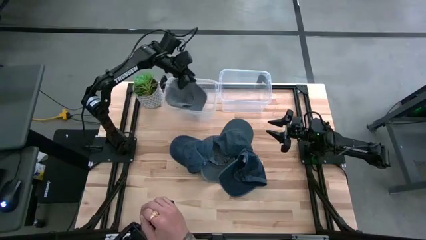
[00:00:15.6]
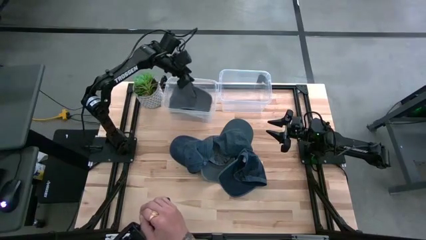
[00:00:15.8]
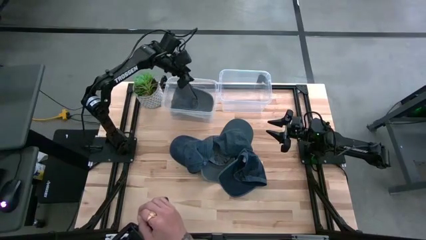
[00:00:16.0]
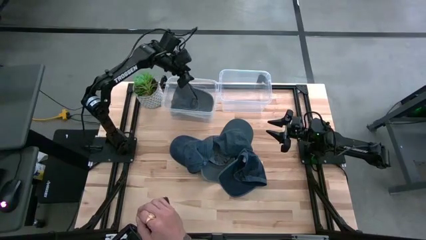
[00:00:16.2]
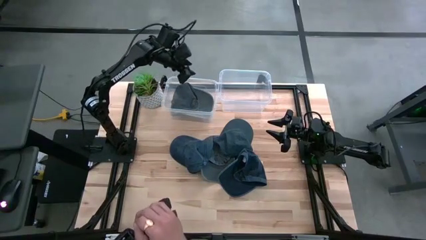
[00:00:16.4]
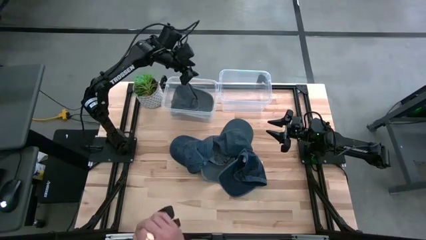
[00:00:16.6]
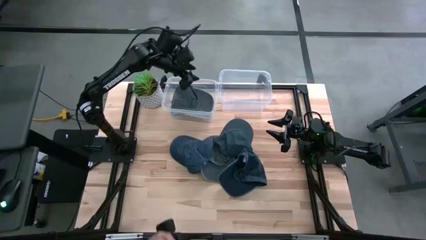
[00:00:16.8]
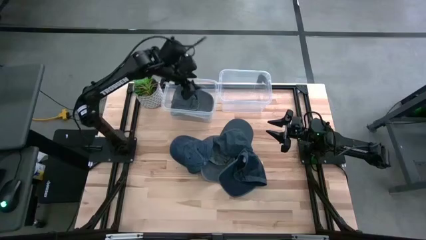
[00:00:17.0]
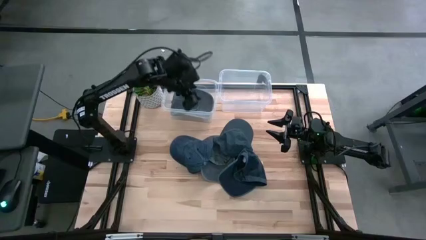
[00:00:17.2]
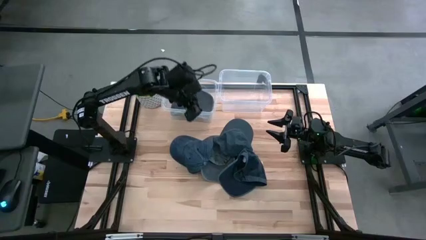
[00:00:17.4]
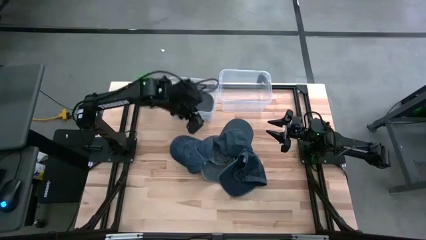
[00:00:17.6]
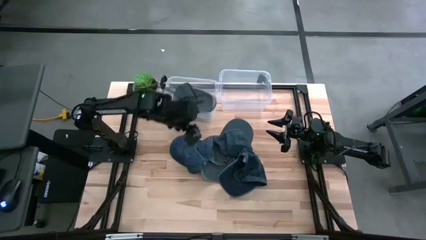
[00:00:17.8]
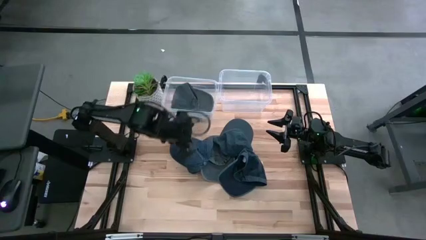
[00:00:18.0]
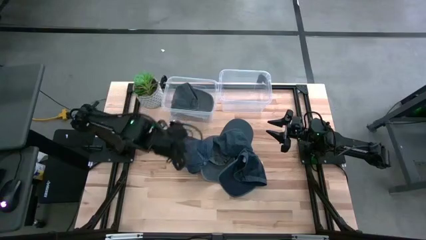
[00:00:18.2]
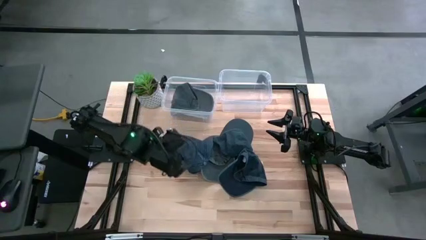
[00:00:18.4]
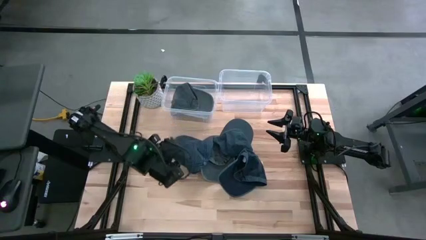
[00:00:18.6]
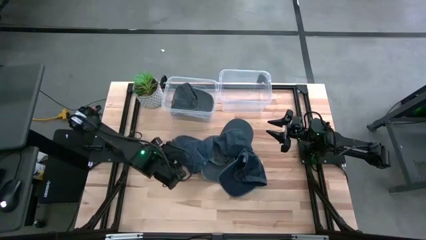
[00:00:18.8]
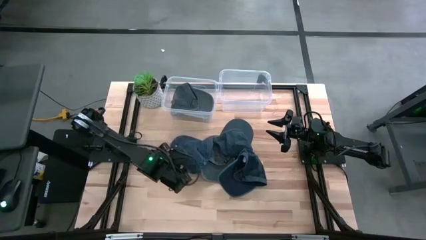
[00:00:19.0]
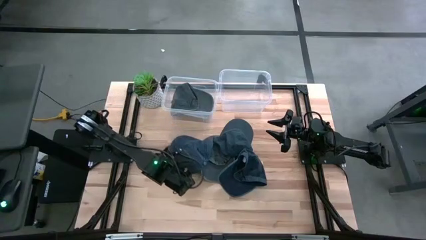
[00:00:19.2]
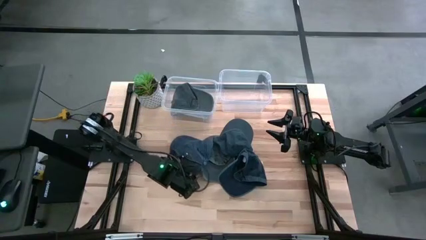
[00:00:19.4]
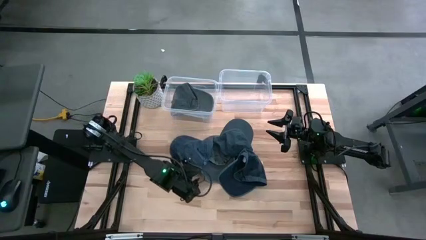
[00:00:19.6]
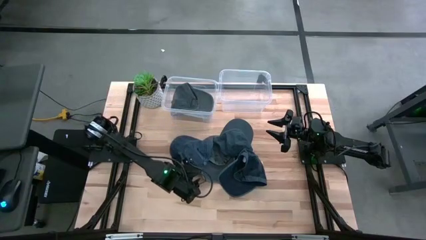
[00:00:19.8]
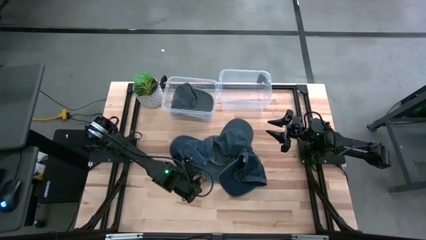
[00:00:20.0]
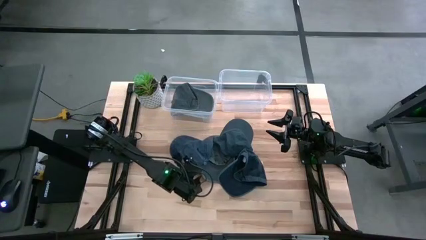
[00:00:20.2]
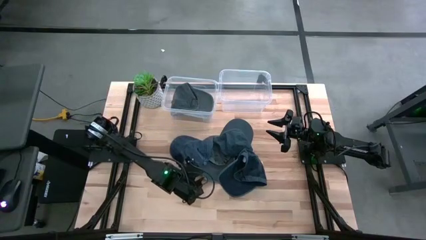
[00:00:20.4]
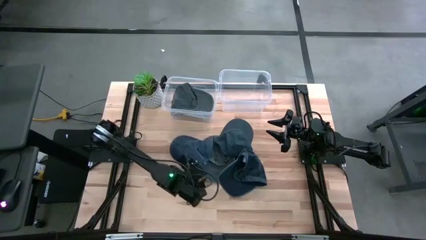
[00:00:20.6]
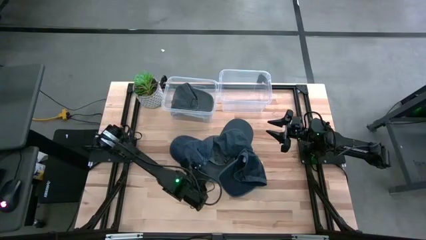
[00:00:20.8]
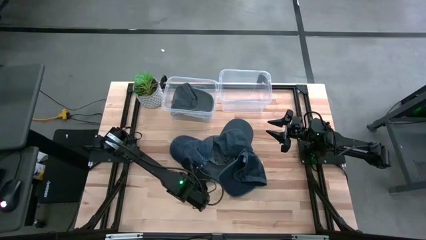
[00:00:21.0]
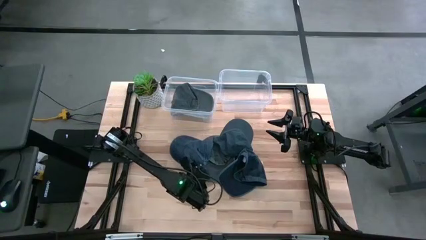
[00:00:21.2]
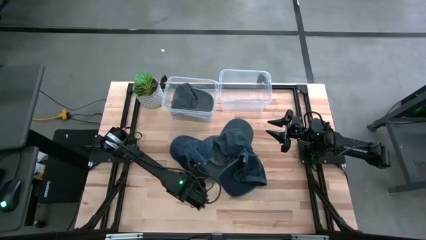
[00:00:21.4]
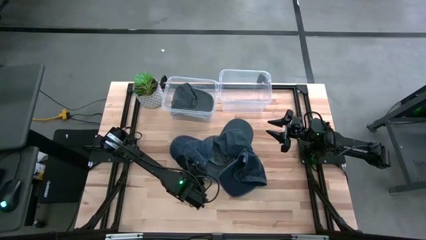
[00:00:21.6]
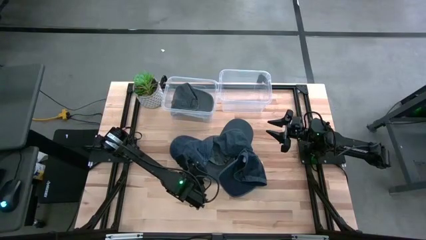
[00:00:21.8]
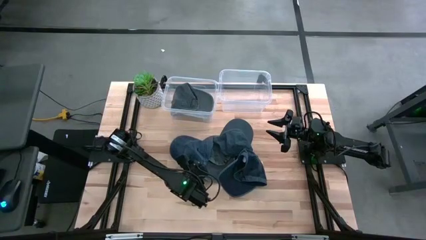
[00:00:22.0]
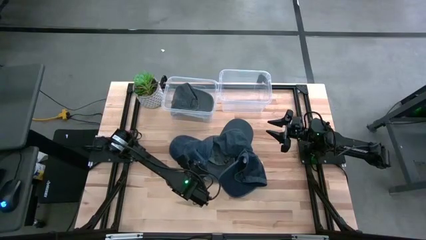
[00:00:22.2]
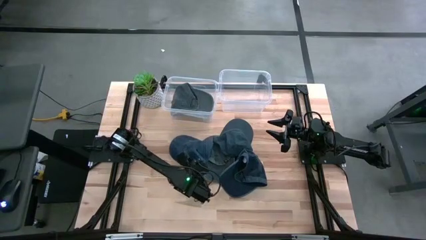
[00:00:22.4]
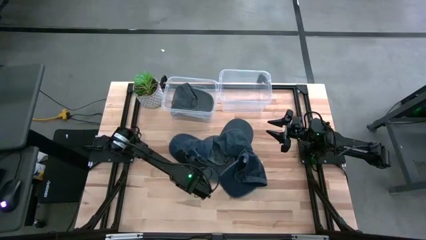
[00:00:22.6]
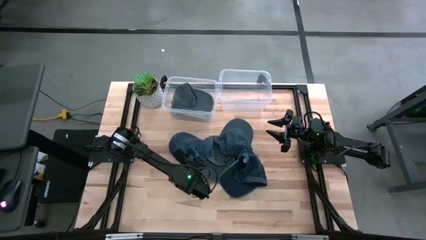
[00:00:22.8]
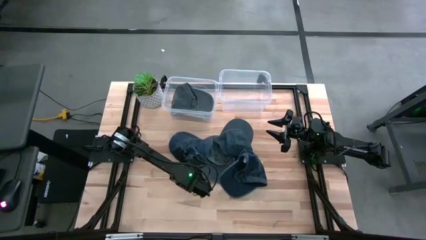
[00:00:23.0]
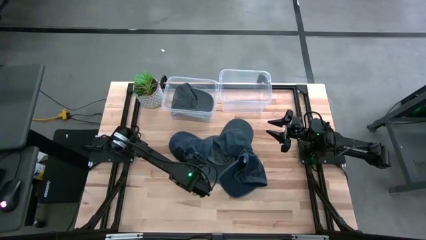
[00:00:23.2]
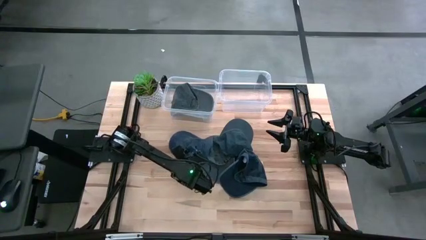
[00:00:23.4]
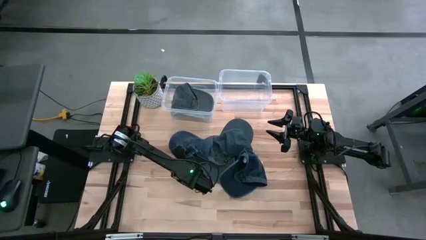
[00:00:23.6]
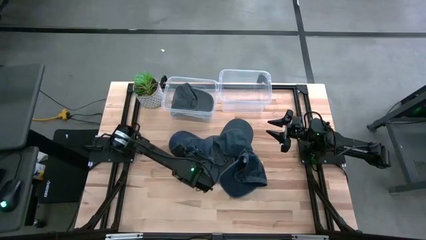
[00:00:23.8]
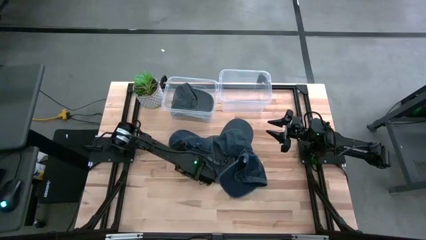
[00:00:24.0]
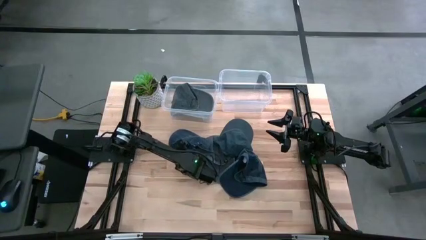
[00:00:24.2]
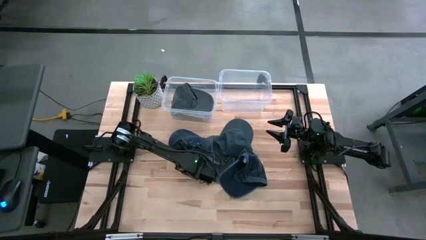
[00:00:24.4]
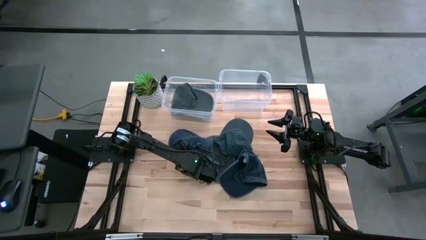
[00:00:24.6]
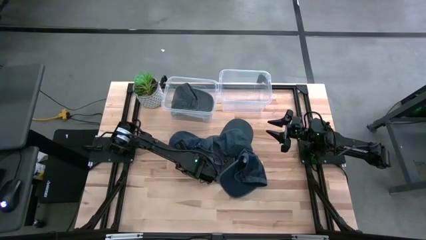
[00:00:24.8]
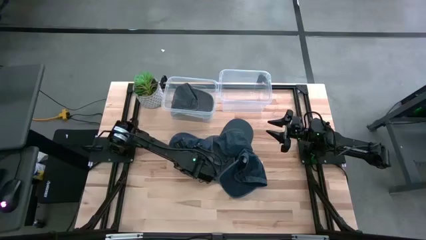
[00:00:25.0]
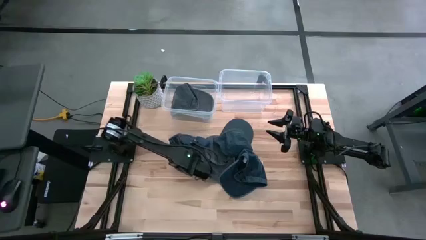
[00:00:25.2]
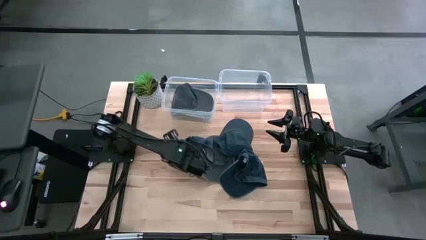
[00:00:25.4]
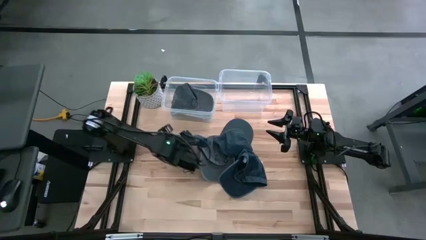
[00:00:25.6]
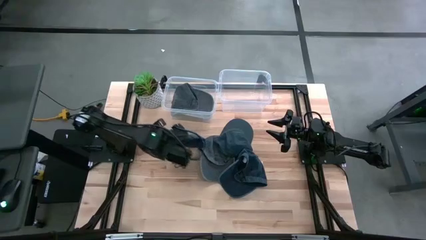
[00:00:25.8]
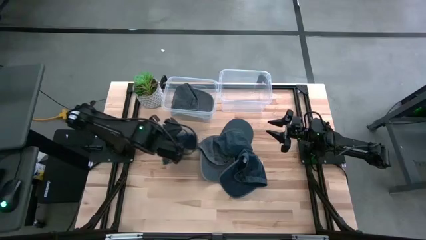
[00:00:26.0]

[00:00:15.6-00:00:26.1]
Task: Pick & Place hat
Put the middle left blue cap into the right transparent bin

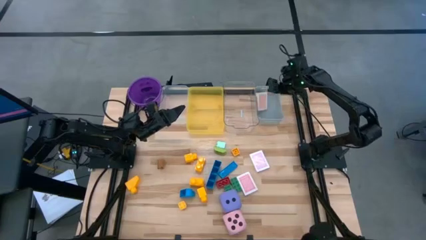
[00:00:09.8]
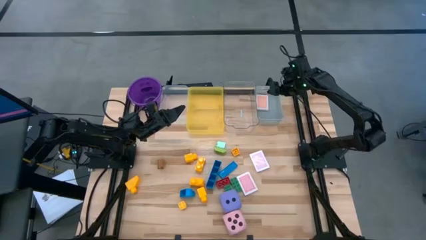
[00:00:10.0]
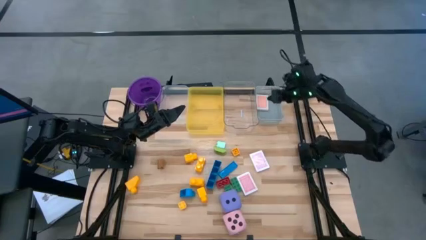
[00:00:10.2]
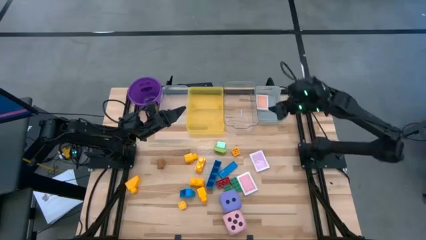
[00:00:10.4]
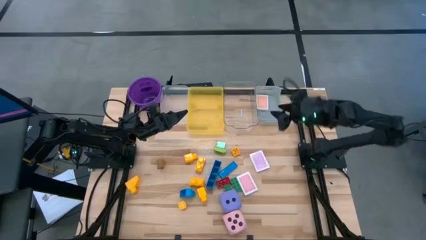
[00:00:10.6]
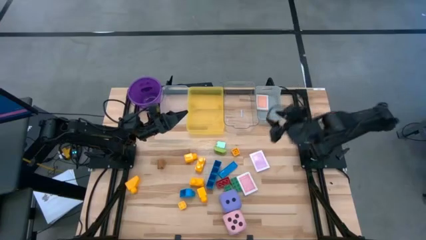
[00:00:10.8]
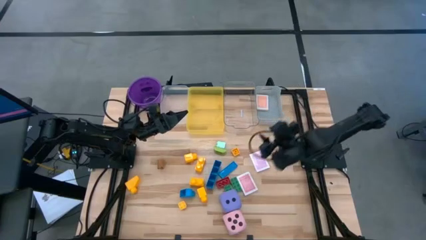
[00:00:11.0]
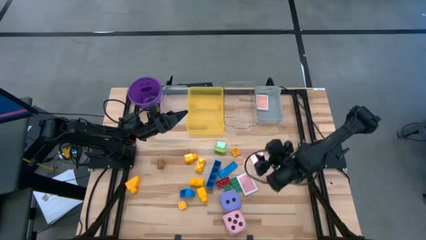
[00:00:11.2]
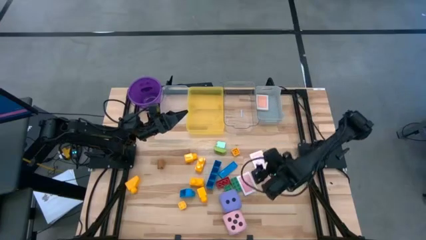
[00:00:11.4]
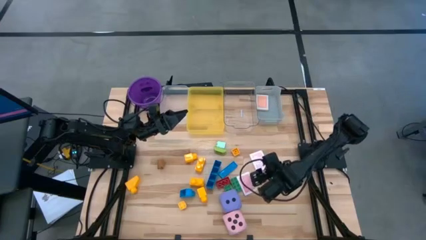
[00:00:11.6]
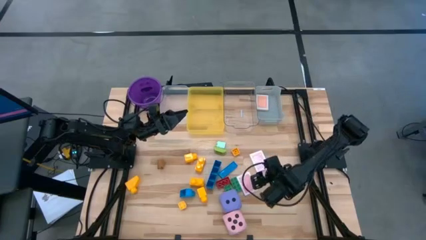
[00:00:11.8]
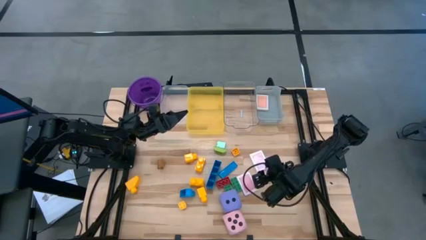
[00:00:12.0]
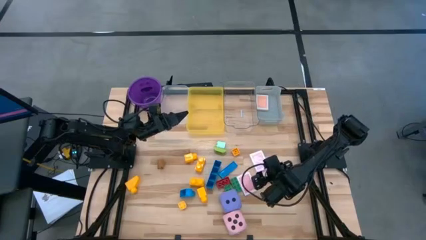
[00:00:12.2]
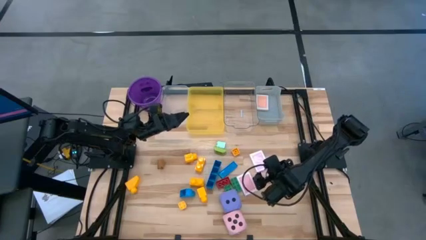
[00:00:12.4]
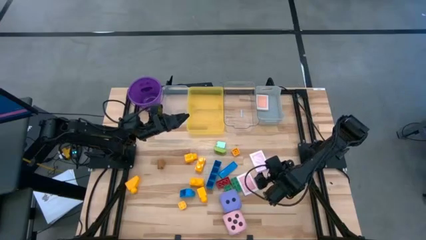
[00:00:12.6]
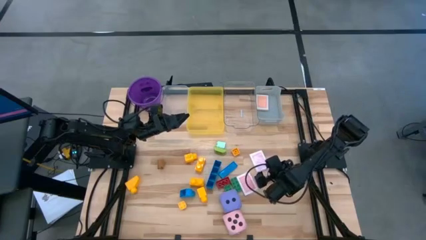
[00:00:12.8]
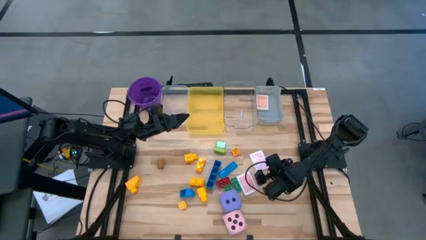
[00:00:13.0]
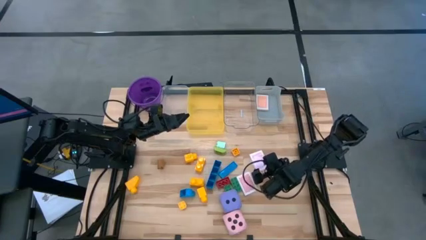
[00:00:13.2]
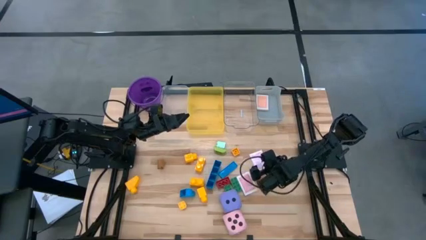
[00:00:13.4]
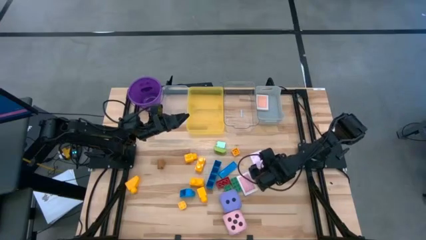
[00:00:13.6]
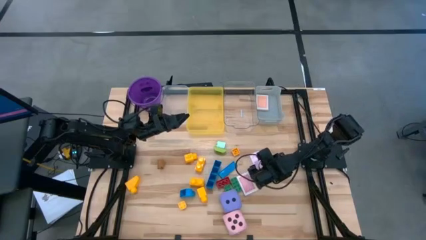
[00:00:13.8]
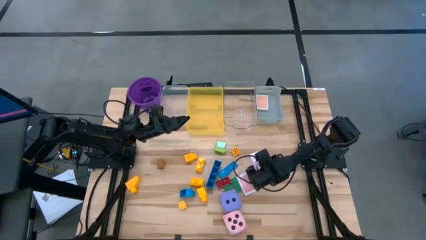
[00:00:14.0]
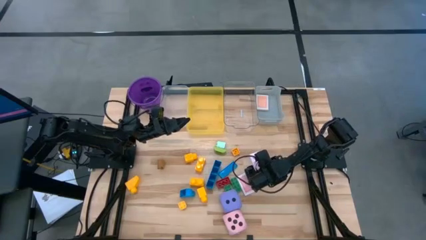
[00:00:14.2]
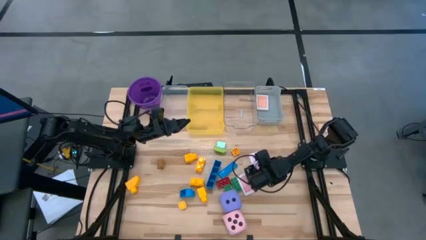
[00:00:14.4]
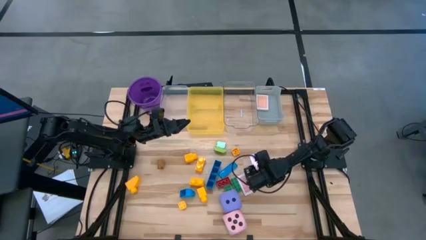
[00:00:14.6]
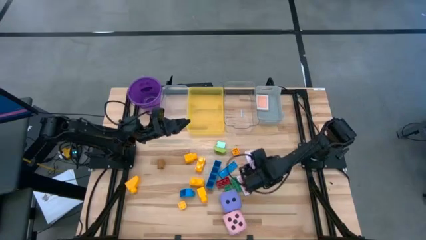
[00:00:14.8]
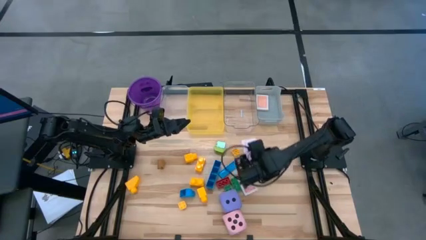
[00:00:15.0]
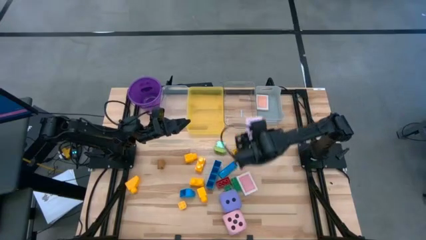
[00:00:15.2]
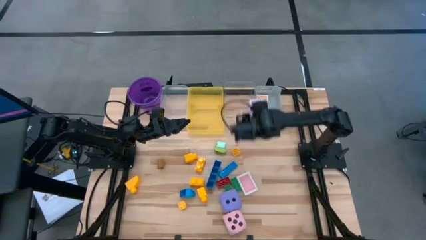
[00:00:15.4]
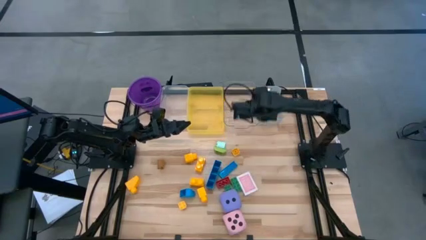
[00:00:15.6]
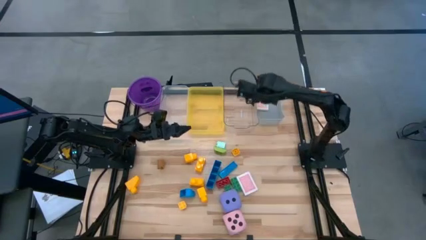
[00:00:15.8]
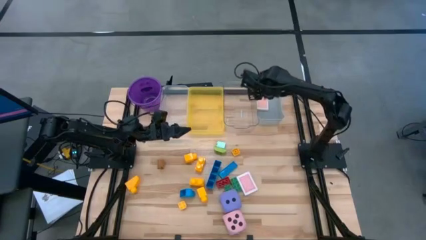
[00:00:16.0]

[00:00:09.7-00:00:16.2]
Task: Pick & Place Toys
Put the pink deck of cards into the gray bin
